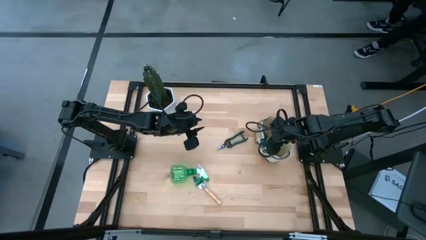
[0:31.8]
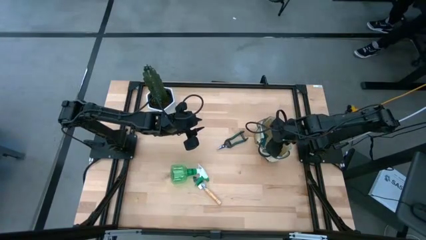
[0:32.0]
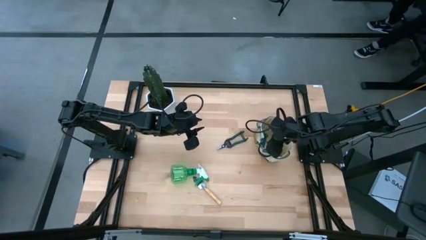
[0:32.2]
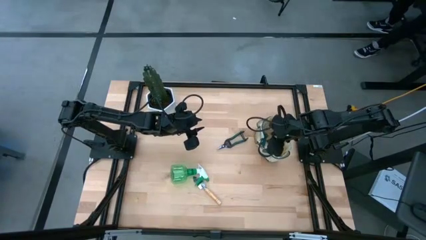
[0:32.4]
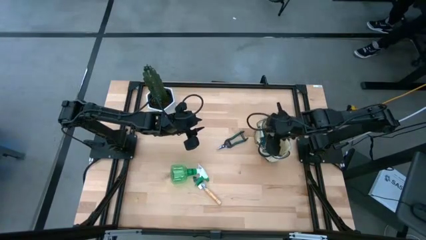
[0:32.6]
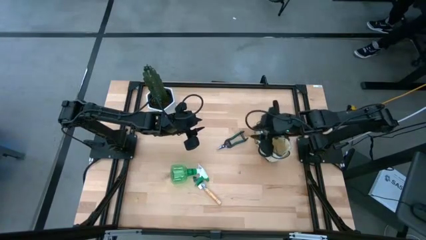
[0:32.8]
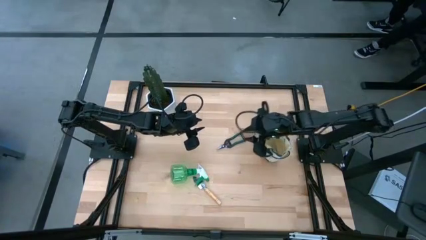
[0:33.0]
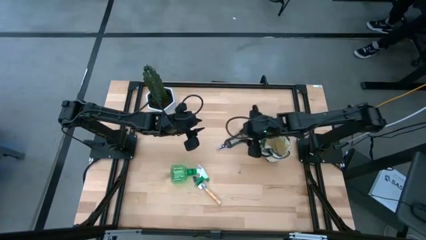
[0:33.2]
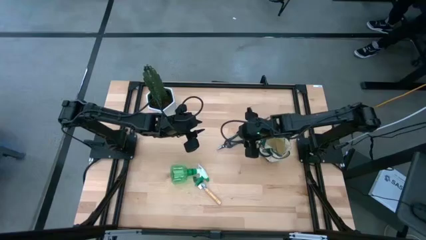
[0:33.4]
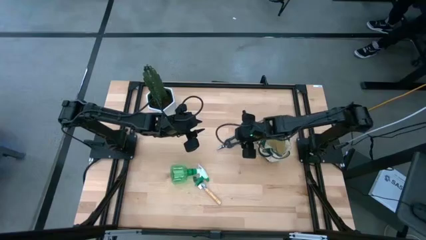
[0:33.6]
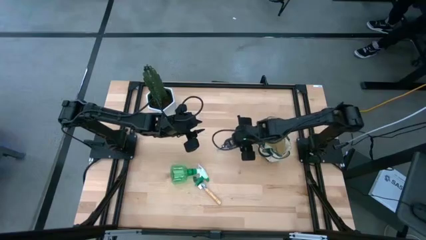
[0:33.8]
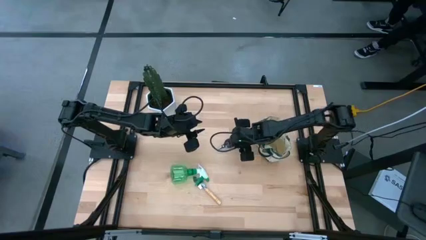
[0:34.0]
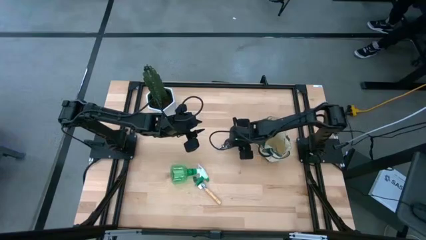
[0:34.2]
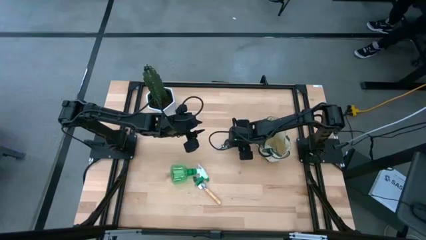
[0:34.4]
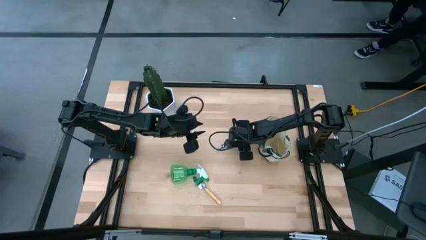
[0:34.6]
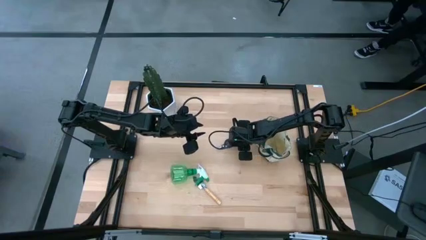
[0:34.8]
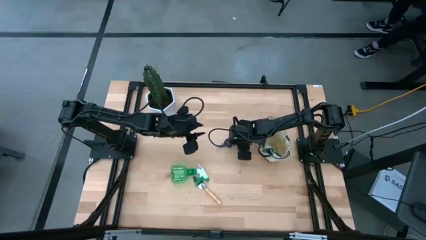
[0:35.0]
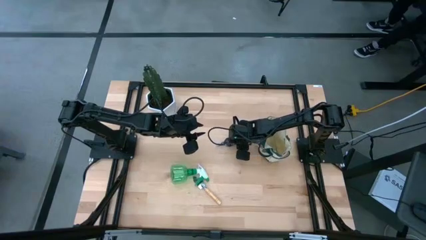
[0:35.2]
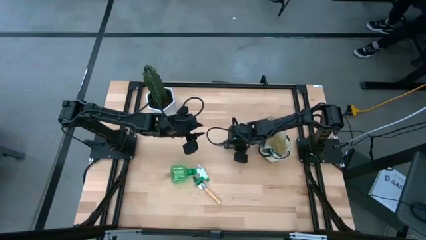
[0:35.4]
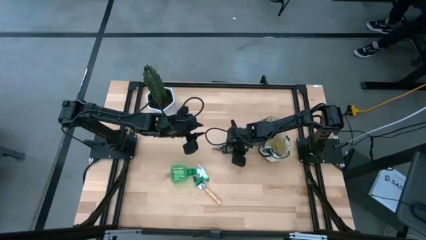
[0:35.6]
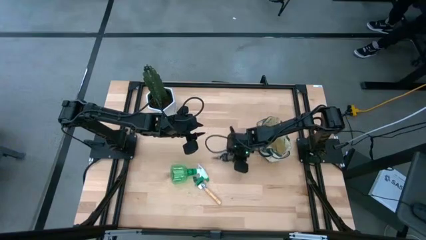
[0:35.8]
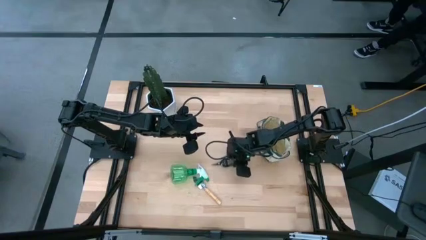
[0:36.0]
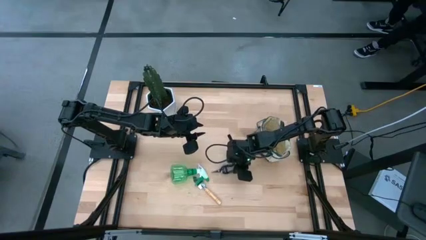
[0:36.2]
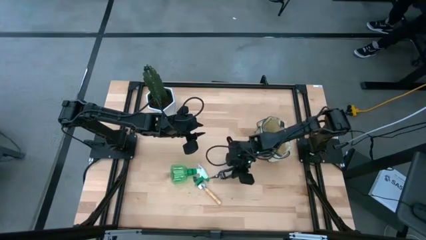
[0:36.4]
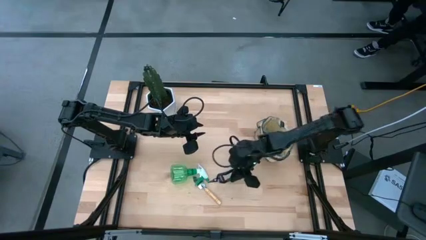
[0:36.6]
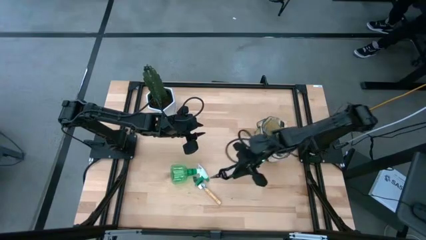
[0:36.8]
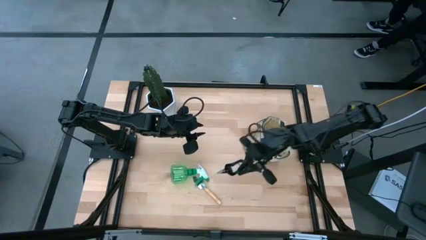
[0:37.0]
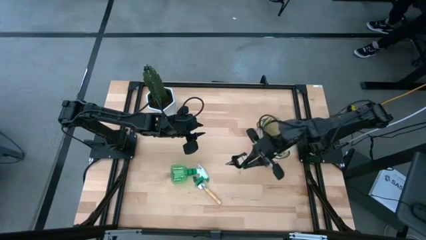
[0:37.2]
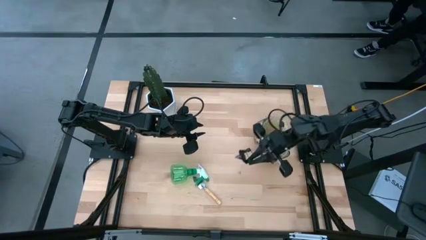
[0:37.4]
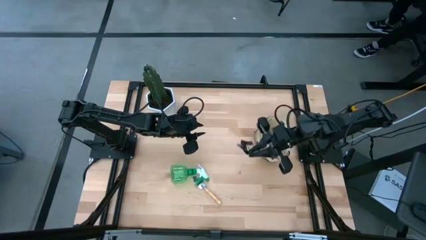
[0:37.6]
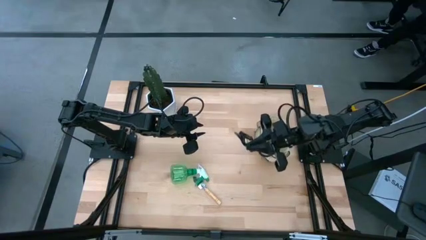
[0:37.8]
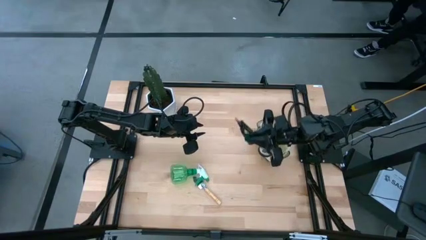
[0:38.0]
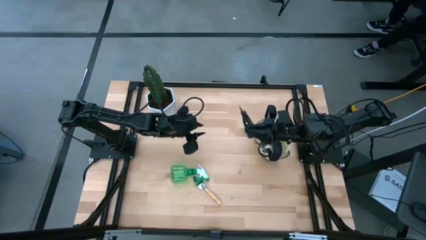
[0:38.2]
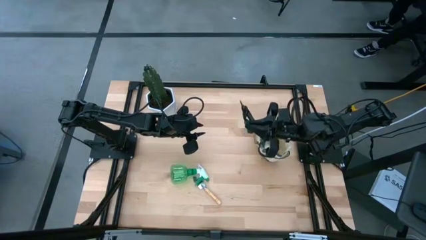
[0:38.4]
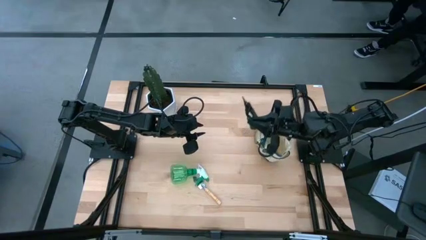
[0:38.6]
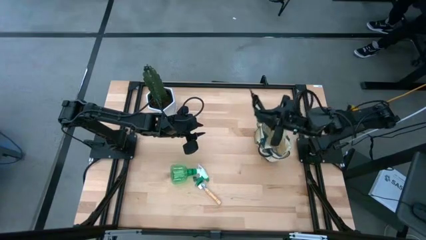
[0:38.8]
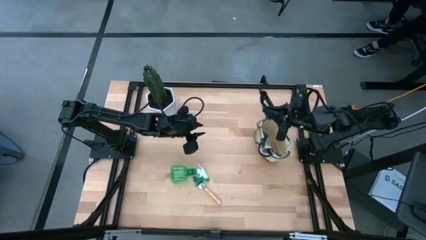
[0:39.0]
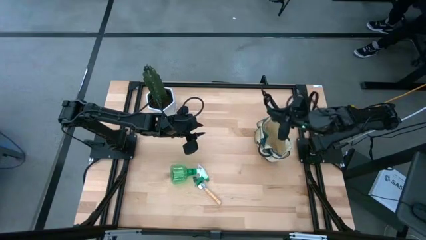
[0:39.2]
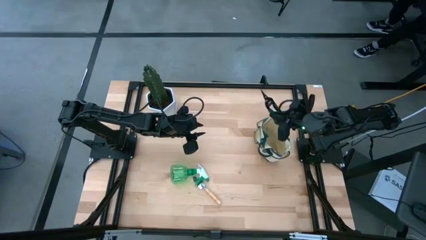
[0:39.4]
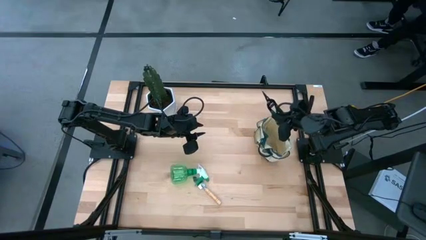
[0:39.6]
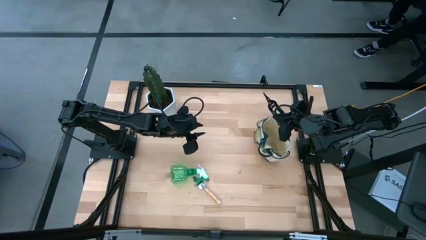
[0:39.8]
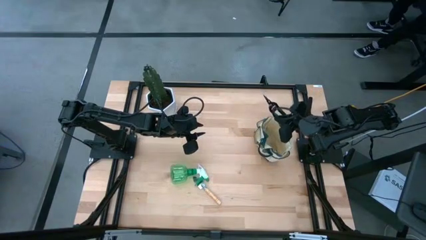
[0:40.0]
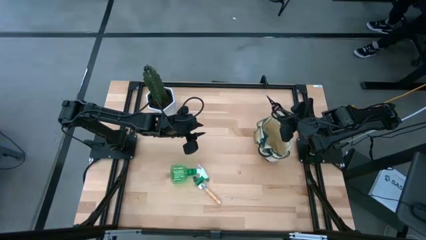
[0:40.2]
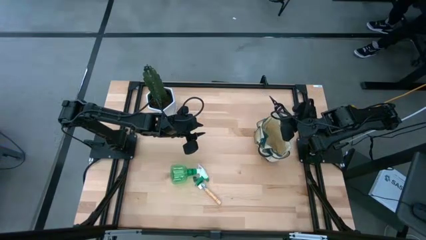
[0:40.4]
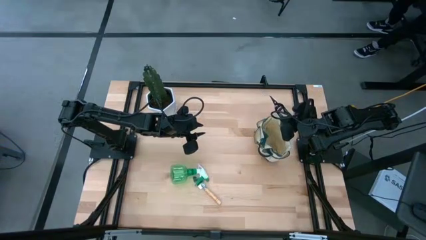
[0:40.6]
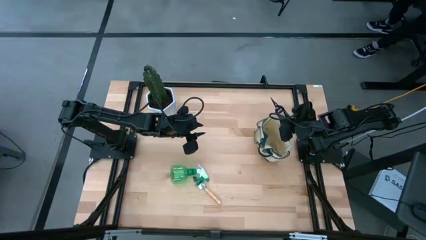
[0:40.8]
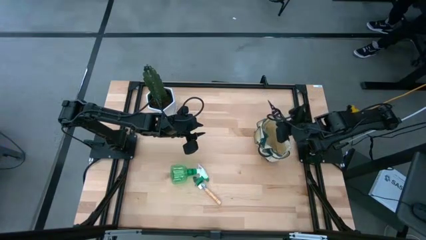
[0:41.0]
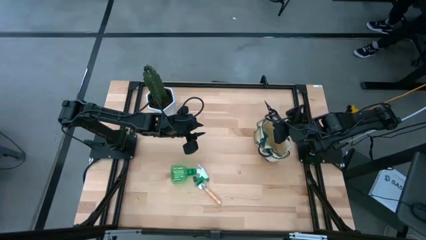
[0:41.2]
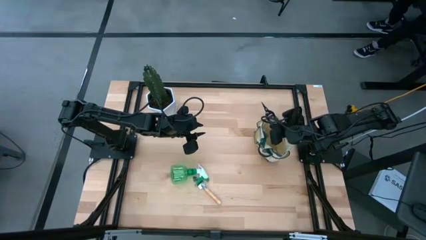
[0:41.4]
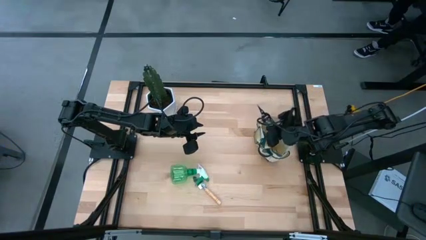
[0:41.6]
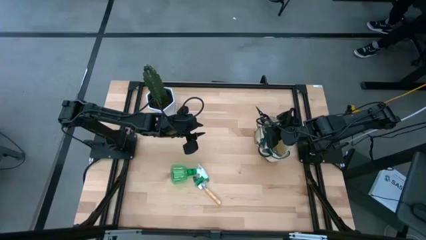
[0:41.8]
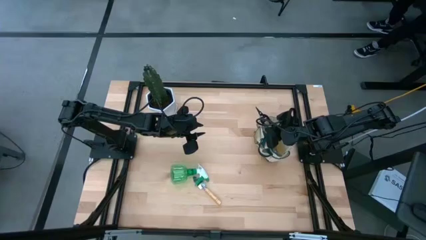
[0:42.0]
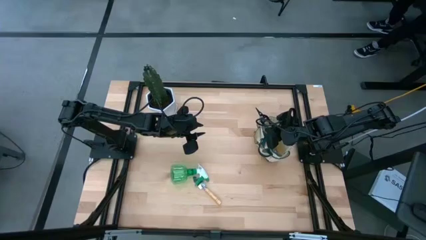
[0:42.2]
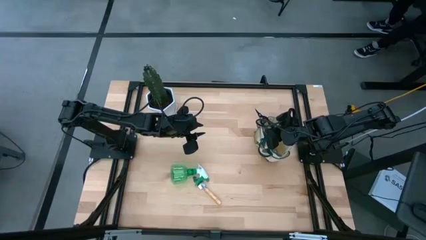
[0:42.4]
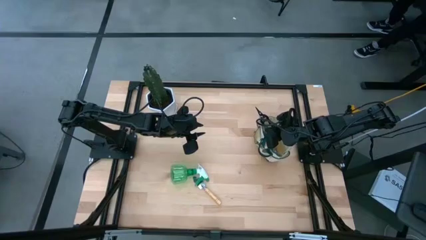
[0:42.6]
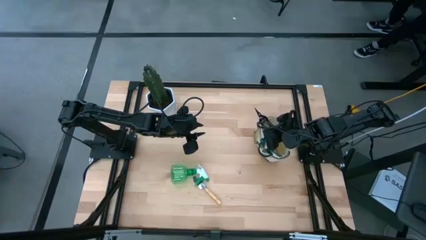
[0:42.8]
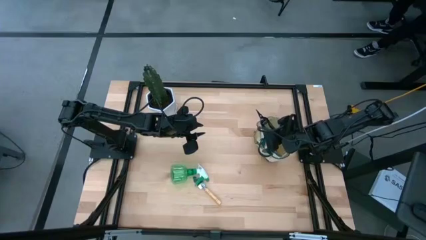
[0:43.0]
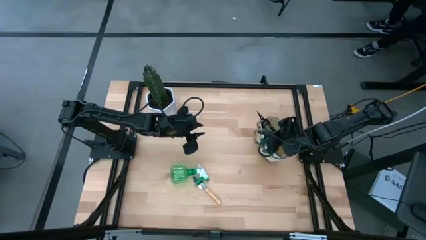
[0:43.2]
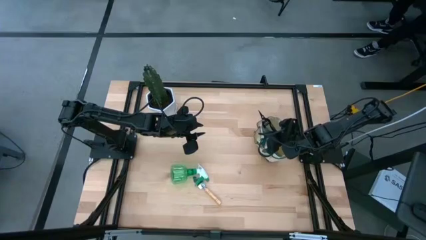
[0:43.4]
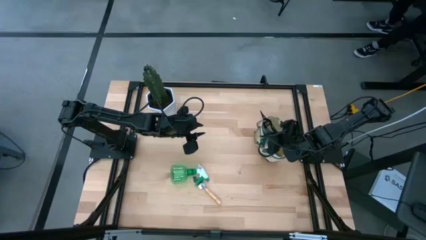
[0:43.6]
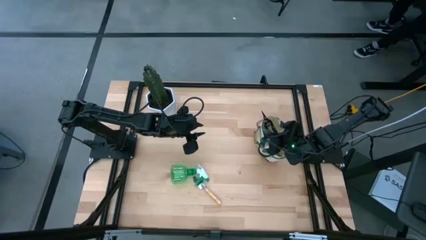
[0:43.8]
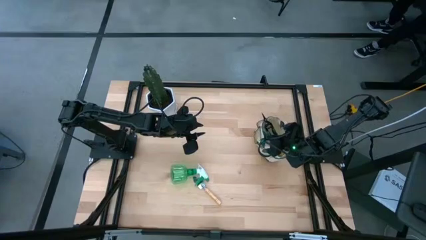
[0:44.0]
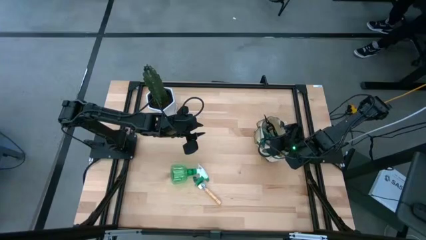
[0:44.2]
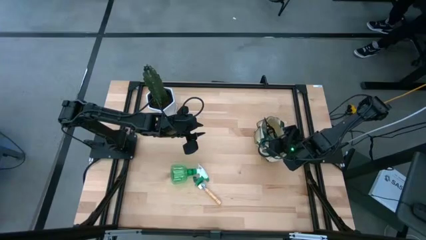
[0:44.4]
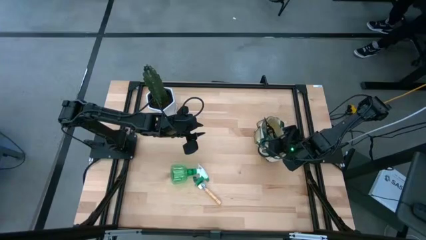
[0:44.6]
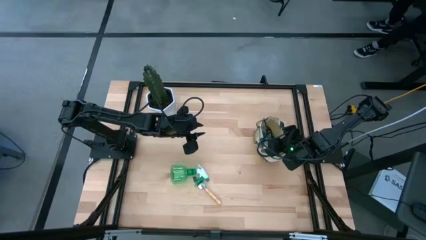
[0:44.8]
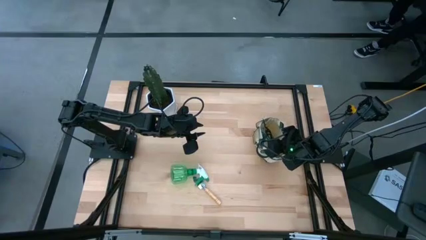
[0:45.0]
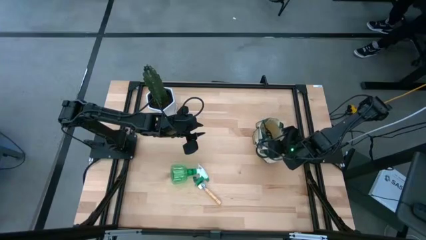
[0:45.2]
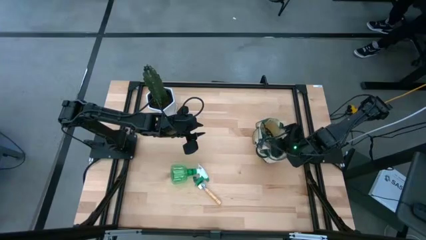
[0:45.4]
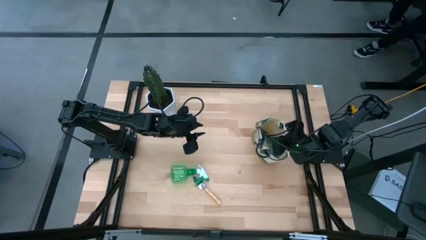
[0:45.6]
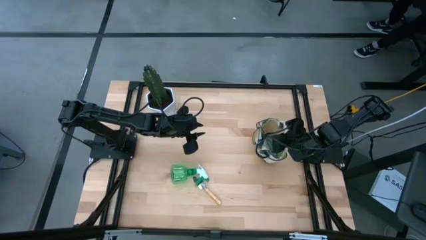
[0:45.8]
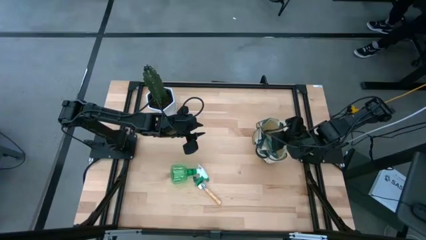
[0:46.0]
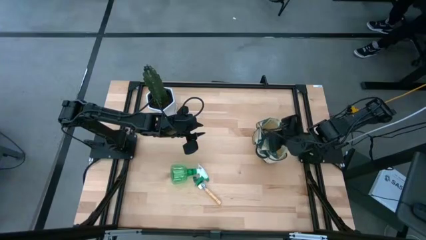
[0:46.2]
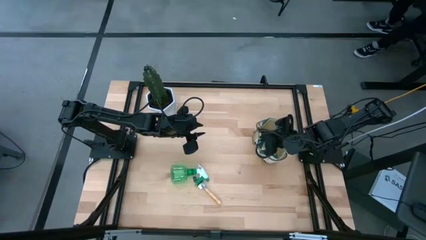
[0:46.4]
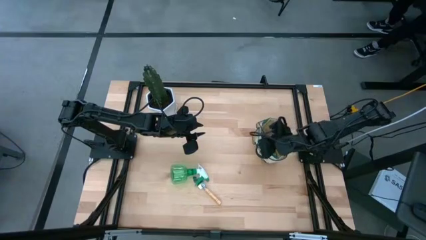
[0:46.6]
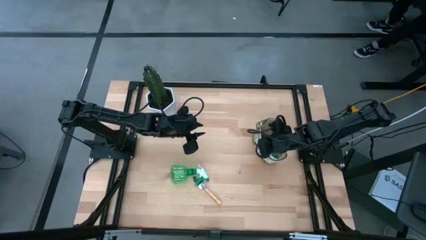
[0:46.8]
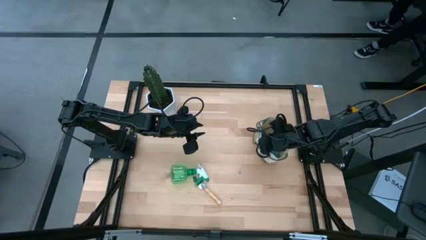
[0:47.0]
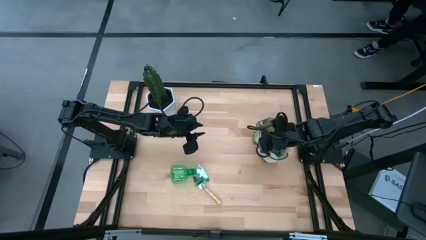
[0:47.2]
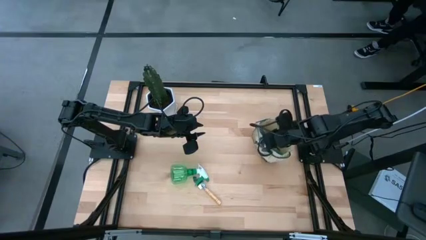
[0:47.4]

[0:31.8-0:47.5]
Task: Pick & Place Garden tools in Gardening bag
Put the green shear scissors into the gardening bag
